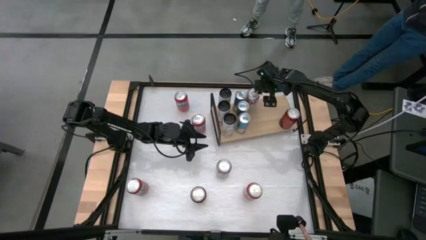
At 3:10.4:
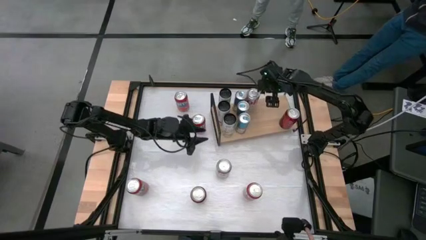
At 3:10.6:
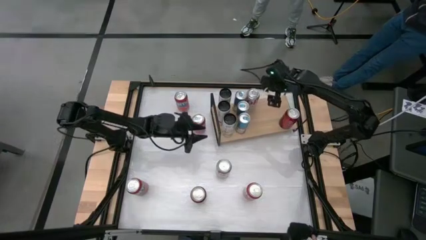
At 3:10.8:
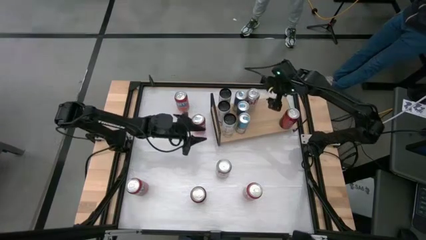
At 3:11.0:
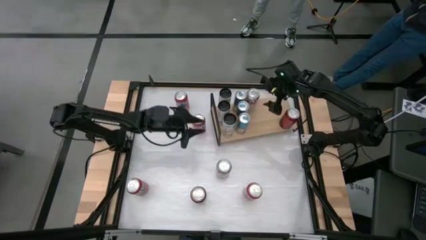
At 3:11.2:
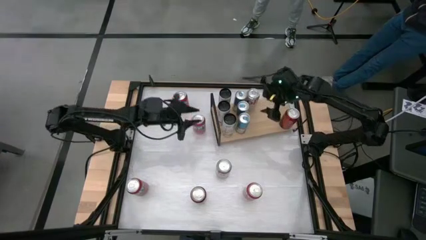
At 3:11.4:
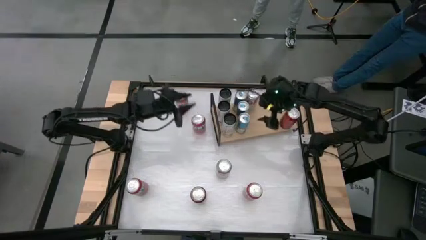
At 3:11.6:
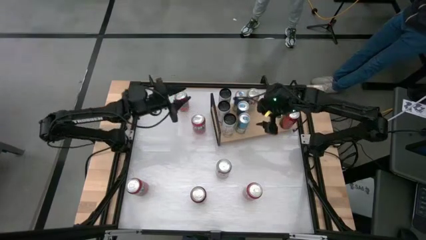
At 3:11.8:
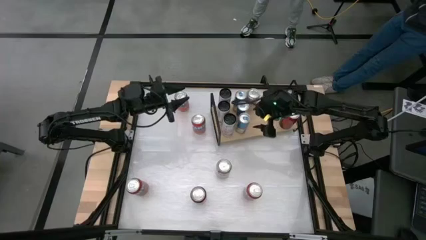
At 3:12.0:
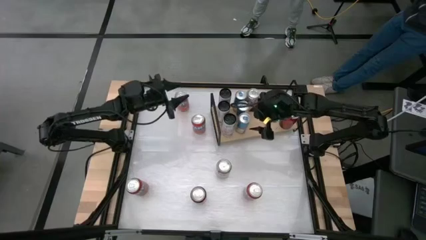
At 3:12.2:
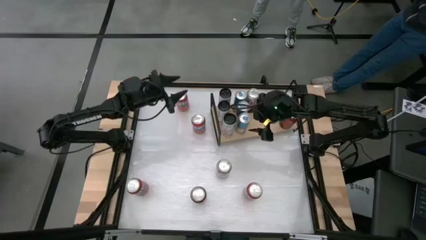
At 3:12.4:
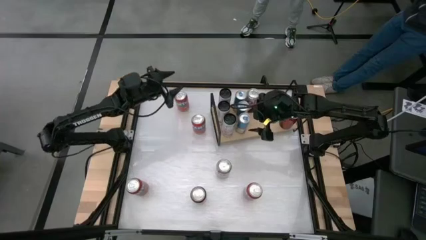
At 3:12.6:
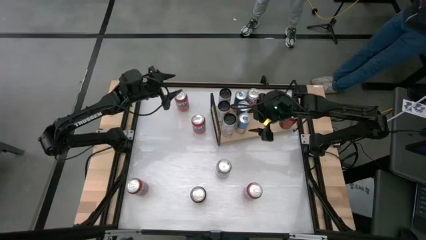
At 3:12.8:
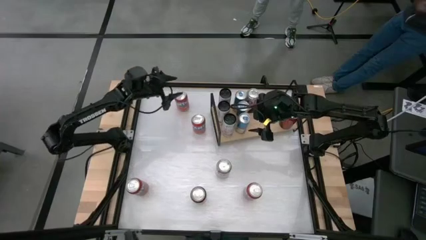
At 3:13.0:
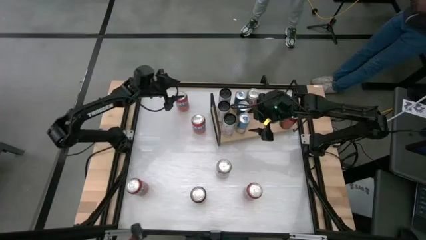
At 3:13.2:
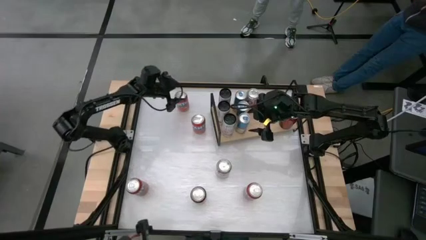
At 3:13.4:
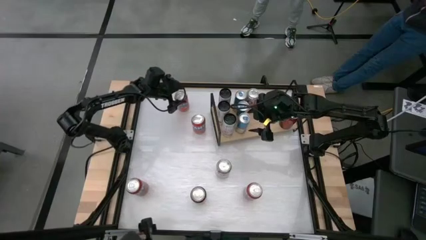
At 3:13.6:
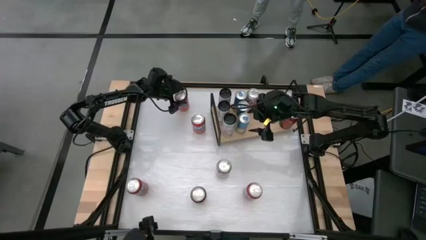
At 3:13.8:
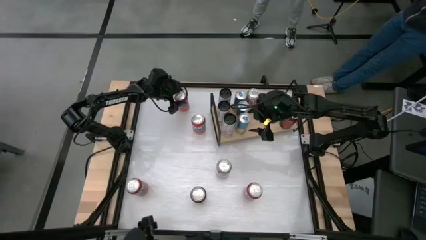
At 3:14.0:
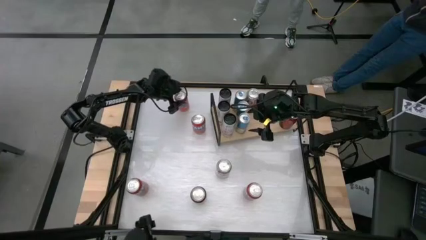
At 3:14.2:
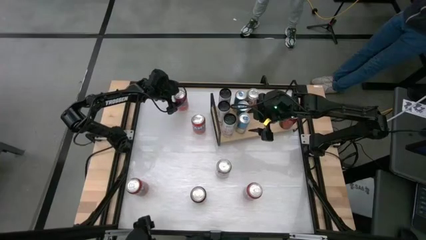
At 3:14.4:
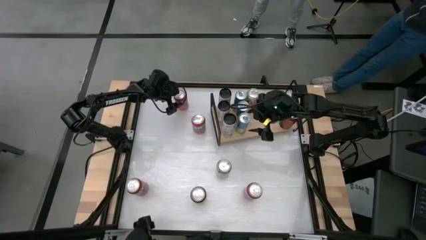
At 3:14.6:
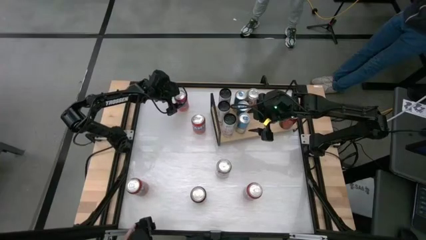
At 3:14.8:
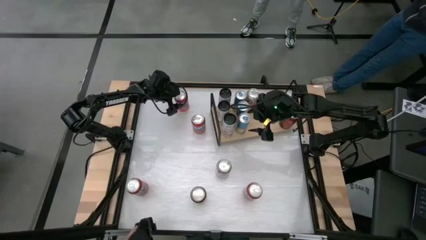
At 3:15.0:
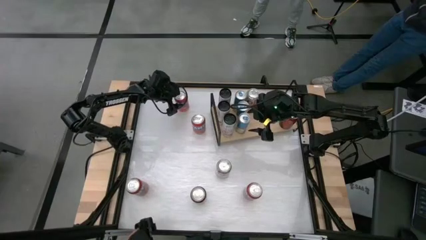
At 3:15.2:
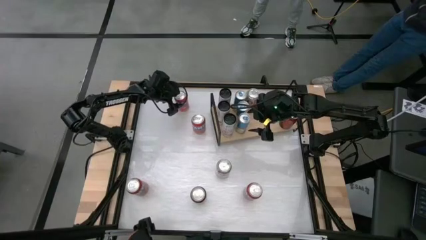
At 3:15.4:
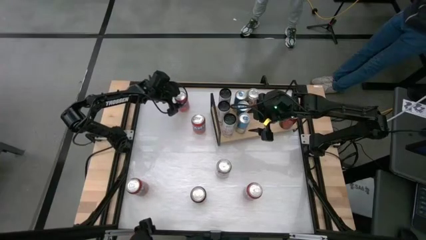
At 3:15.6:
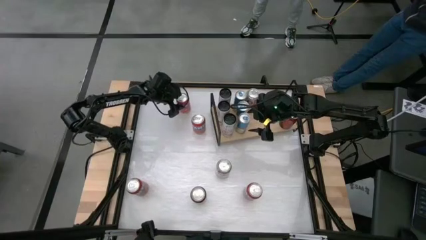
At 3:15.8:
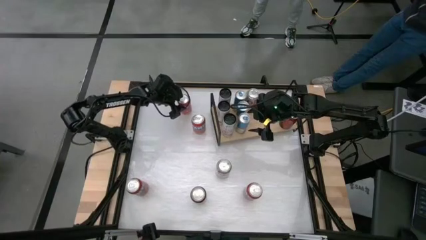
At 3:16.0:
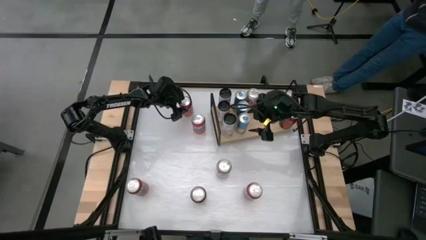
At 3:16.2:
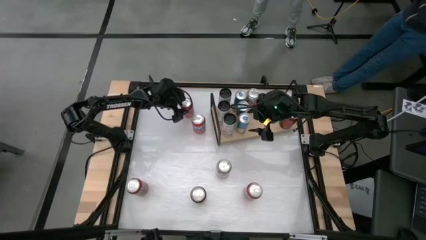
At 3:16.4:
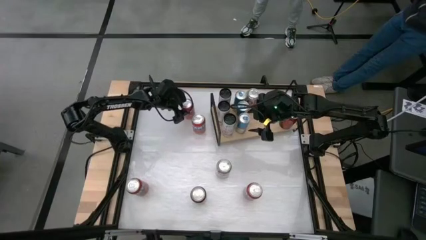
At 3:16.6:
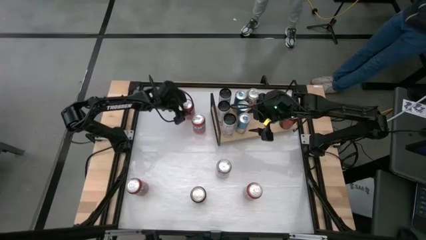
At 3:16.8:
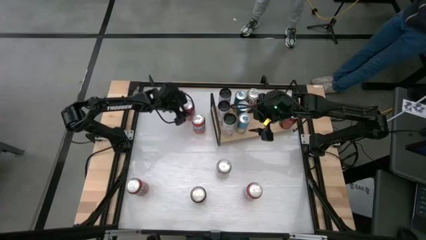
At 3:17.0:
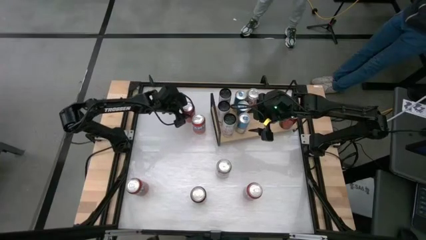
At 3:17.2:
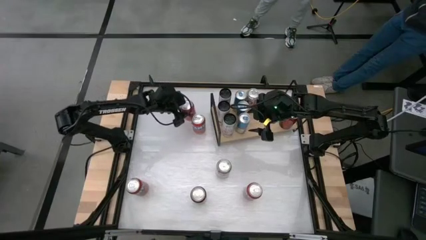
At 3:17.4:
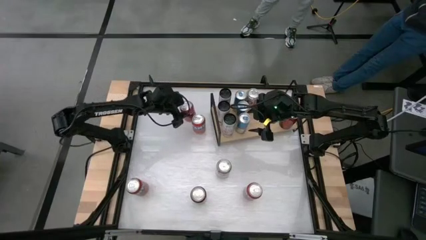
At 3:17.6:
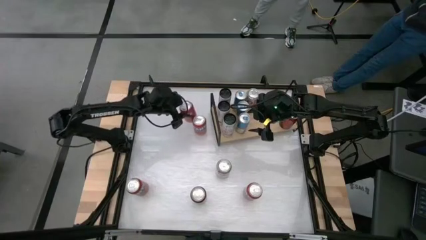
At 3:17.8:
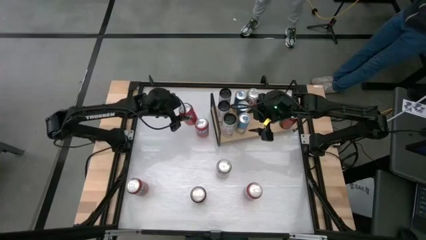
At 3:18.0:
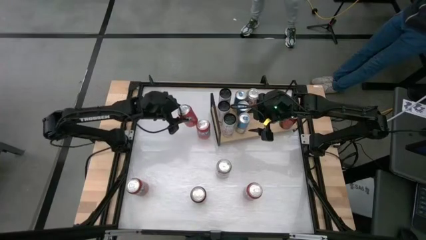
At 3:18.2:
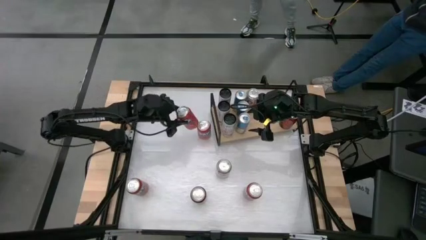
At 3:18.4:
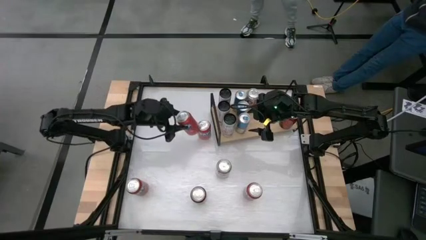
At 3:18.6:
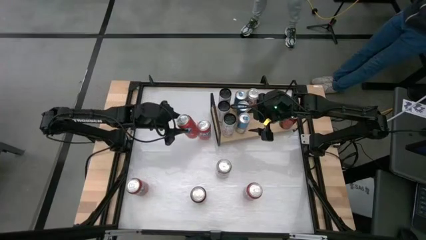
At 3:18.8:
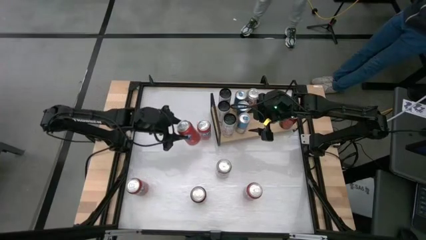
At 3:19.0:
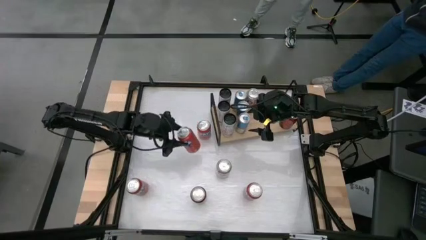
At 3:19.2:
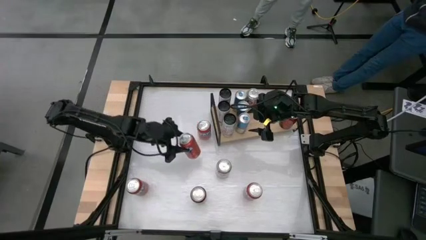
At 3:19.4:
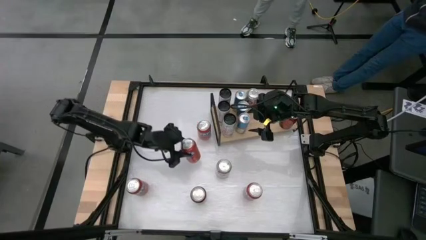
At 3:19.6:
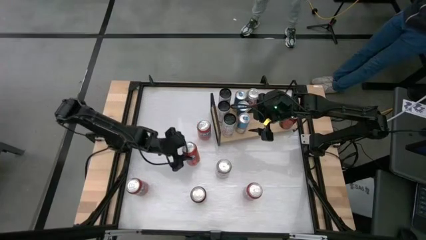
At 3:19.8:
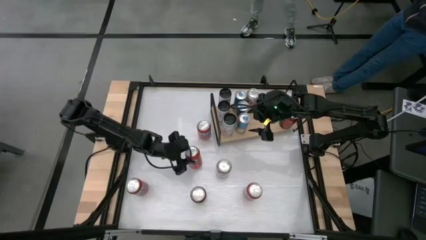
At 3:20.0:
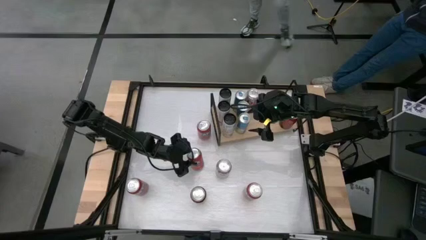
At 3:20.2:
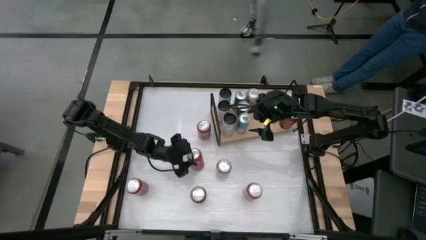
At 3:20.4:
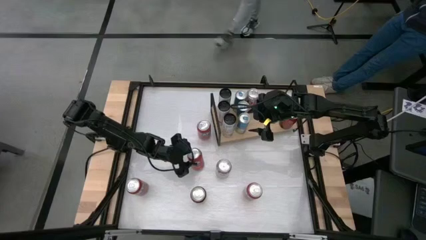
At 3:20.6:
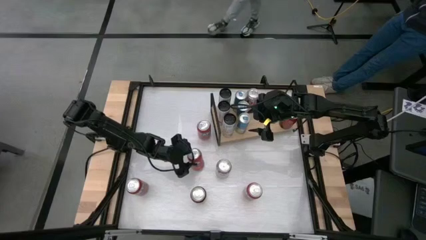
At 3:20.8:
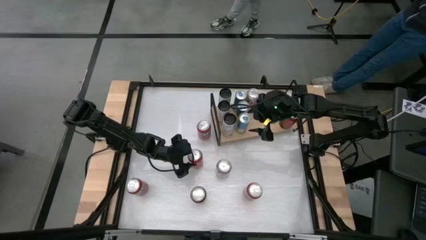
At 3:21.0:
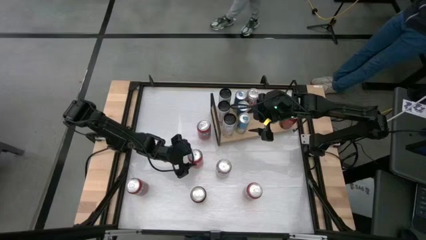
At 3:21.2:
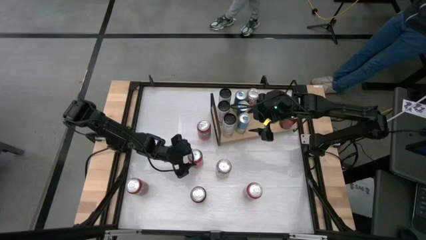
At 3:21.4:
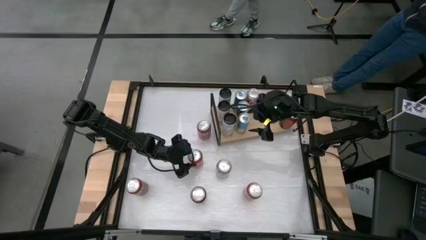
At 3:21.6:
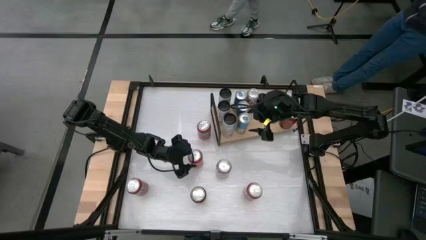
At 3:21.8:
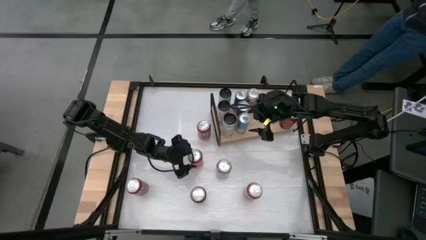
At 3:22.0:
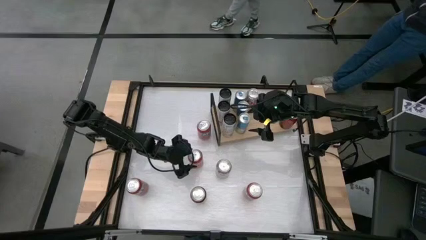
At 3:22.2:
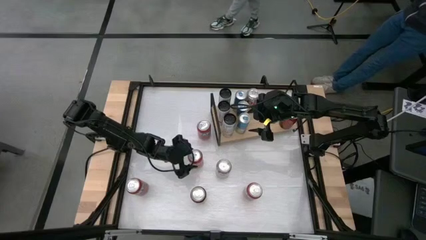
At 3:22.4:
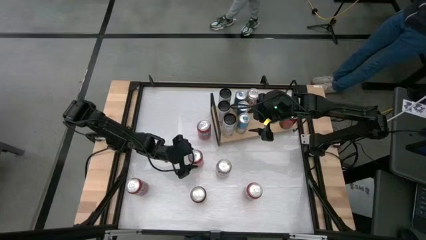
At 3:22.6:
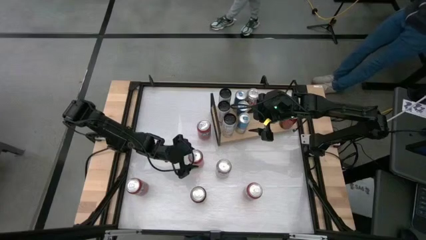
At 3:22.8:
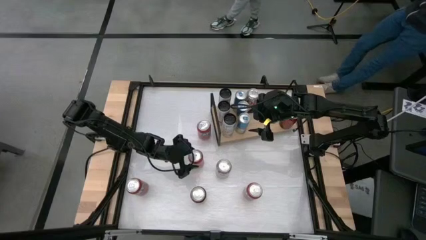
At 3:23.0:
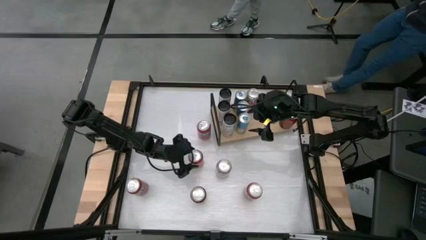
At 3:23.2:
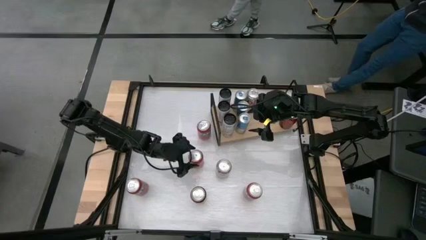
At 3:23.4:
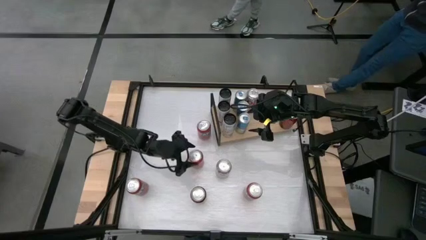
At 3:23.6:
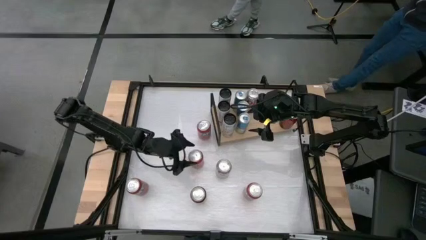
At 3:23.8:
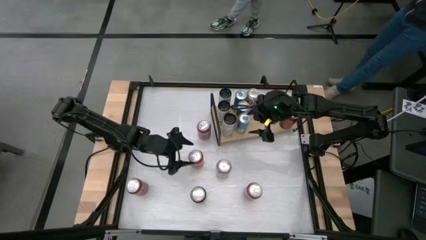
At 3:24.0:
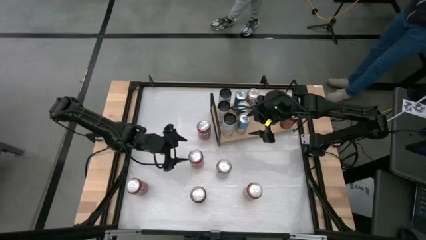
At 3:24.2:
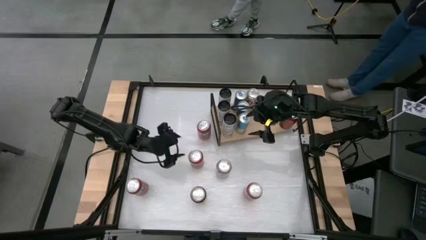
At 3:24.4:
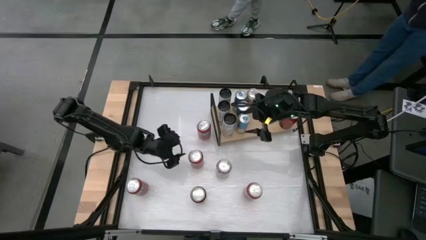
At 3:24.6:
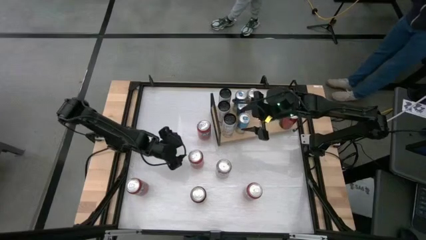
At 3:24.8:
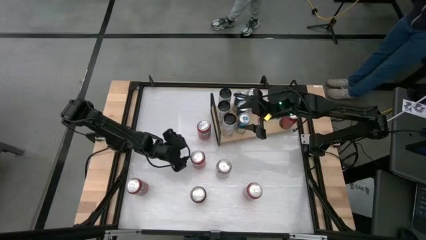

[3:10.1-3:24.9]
Task: Place canned beverage on shelf
Put the orange can on the shelf

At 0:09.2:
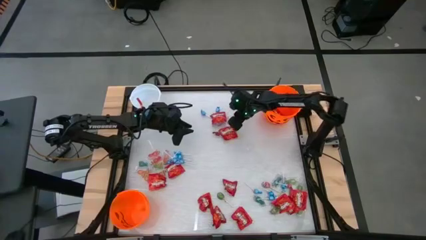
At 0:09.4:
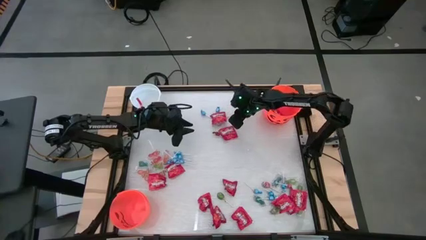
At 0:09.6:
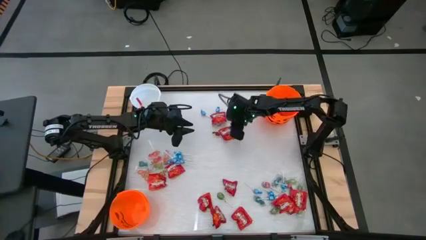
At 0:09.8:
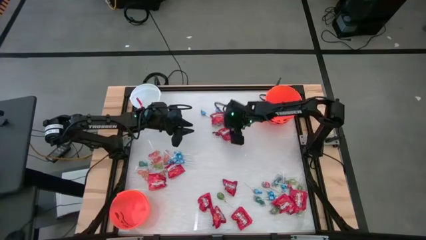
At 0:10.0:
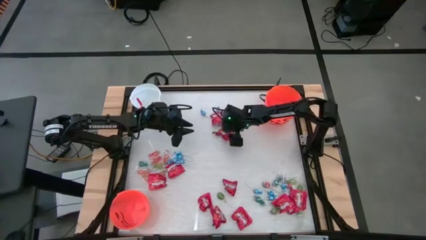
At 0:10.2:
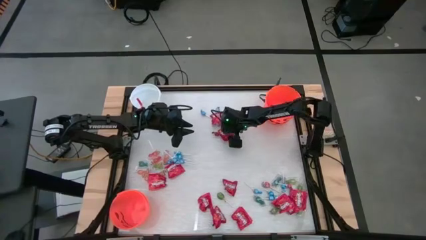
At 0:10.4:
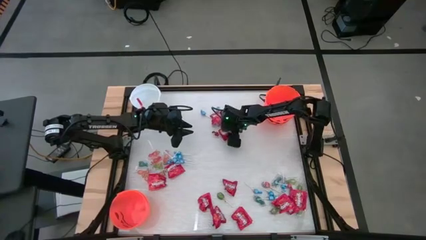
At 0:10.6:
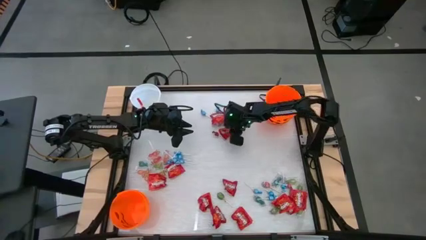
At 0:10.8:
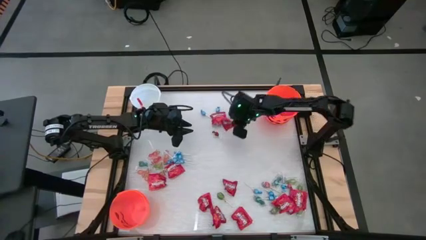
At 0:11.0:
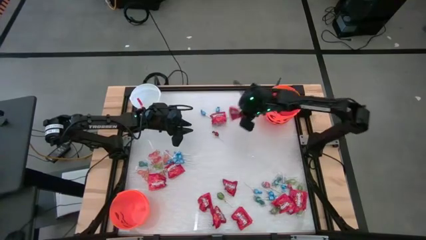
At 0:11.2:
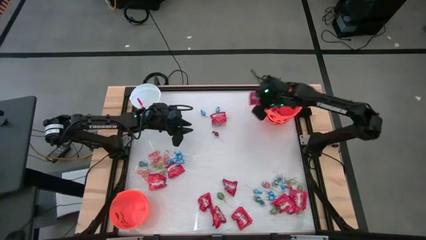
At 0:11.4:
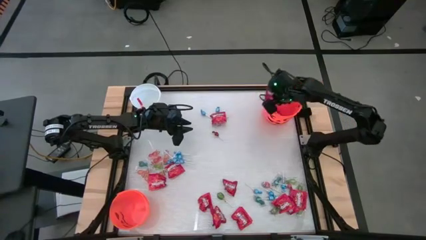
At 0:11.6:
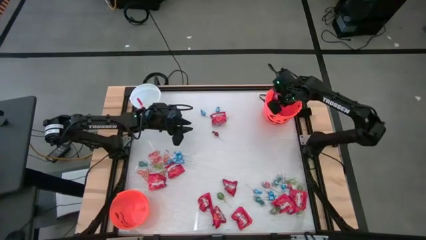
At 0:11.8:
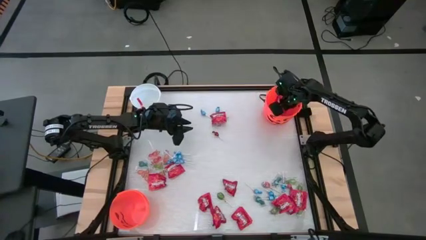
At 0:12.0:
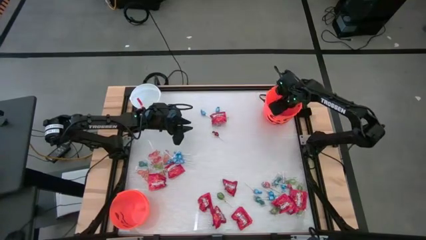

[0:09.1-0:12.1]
Task: Sort candy by brand, put in halloween buckets
Put the red candy into the top orange bucket
